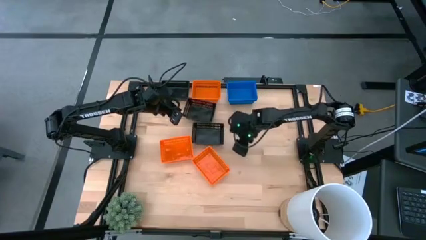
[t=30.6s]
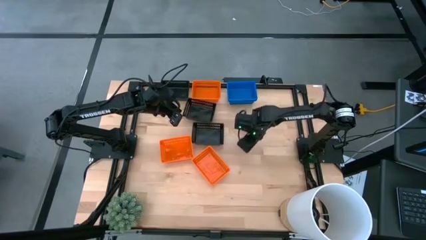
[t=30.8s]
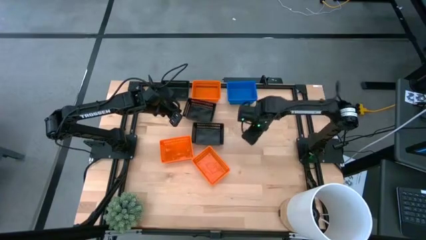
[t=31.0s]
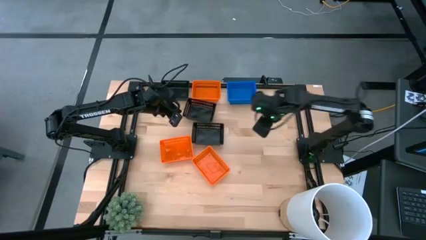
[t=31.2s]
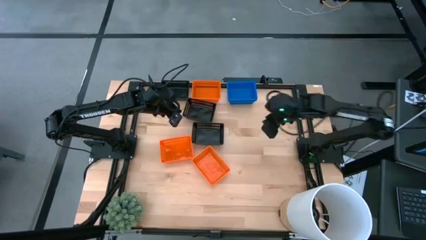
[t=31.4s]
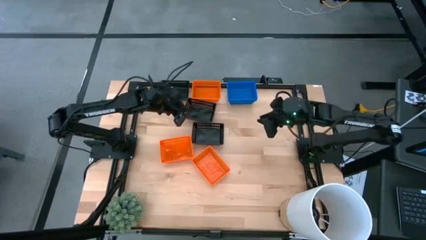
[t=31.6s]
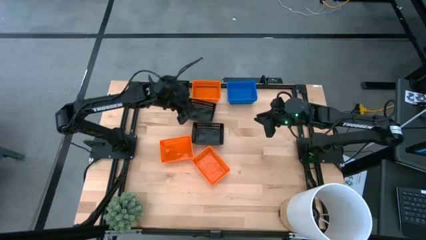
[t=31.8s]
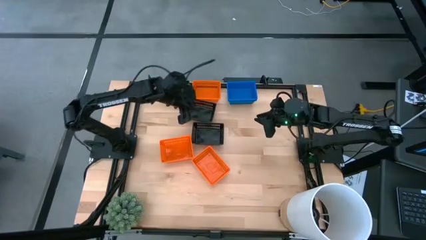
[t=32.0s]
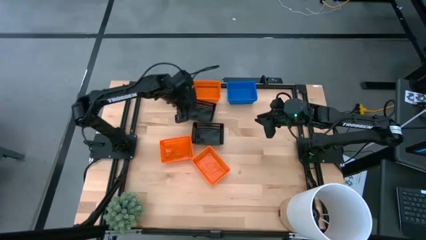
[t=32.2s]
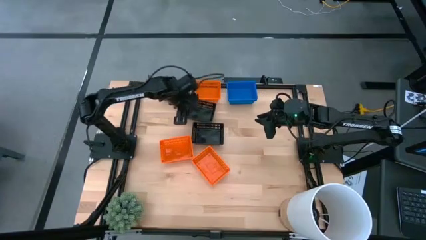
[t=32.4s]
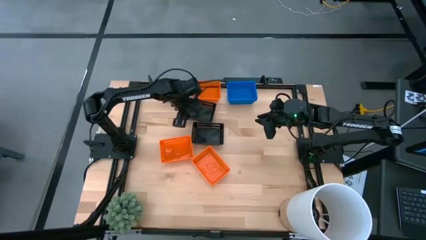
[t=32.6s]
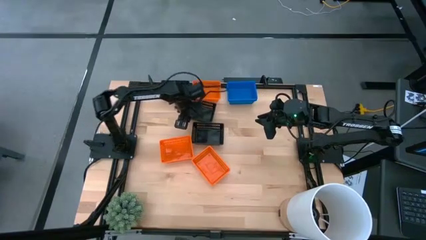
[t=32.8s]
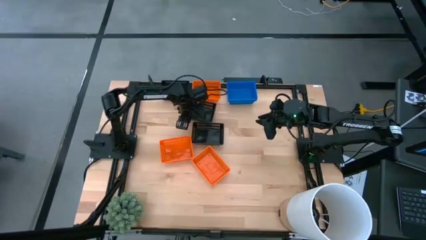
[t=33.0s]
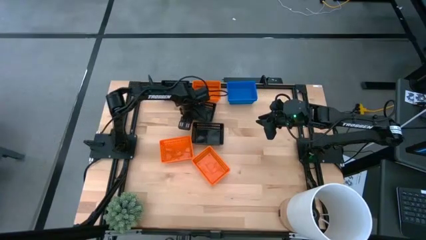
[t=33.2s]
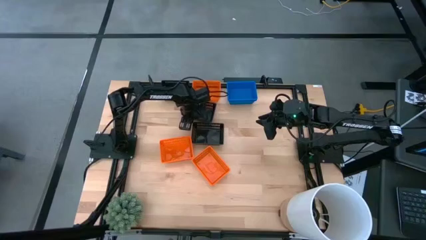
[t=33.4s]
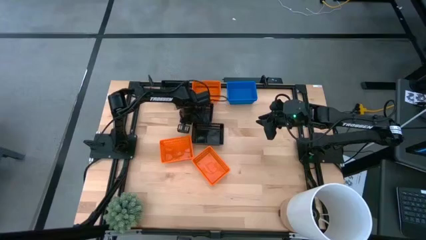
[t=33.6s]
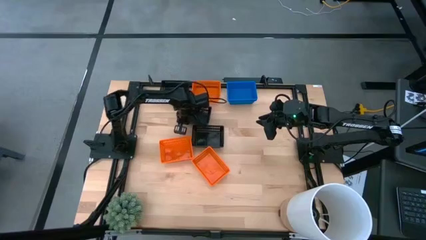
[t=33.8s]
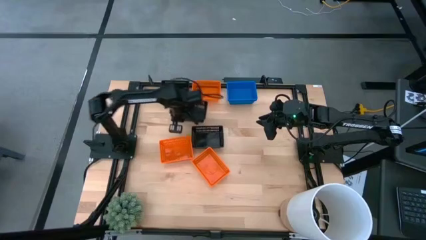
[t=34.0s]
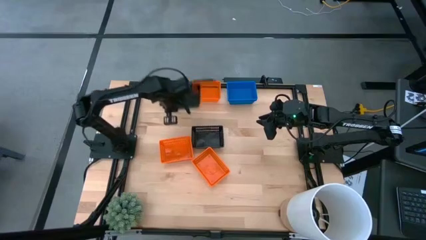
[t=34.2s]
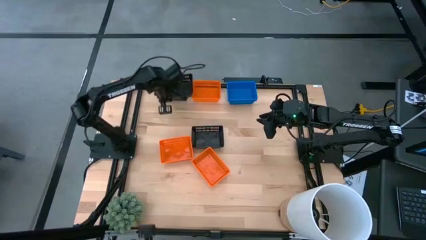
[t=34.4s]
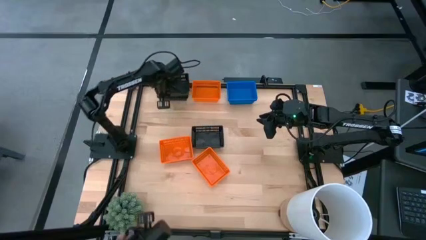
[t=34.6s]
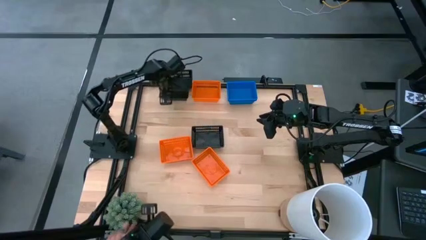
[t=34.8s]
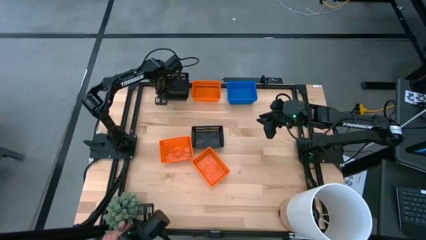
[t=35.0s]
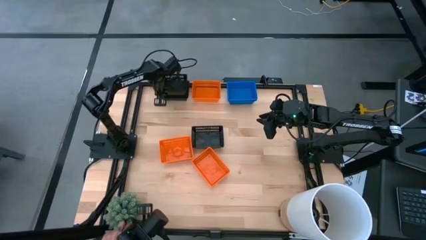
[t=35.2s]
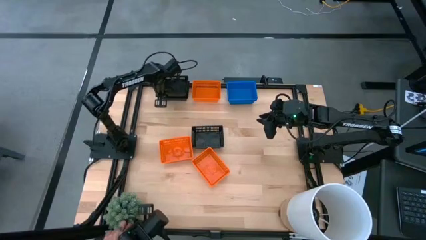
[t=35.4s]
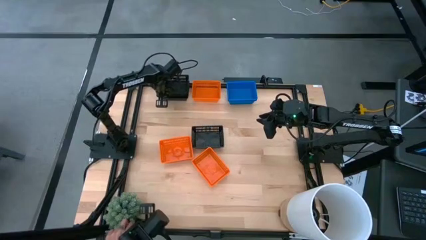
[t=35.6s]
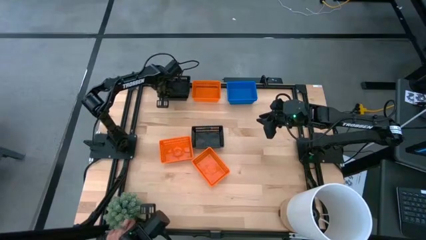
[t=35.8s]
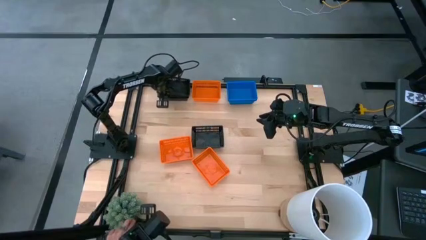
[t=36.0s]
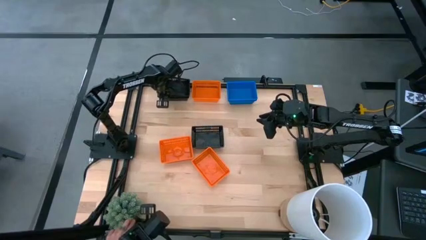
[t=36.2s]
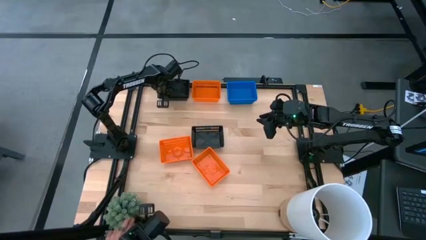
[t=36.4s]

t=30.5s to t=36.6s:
Stack the middle black bin on top of the top black bin

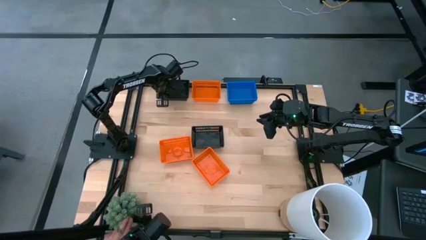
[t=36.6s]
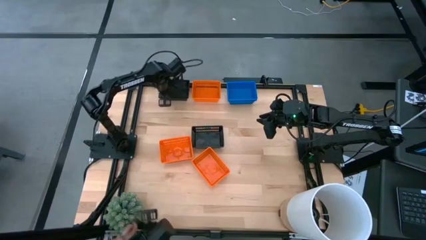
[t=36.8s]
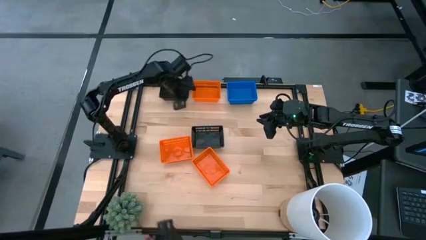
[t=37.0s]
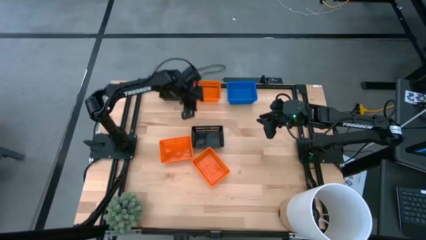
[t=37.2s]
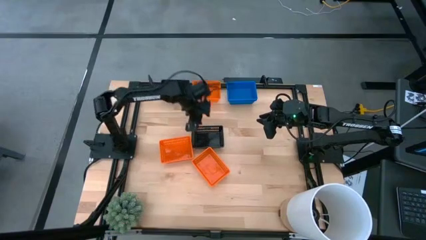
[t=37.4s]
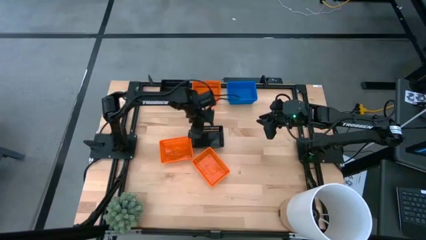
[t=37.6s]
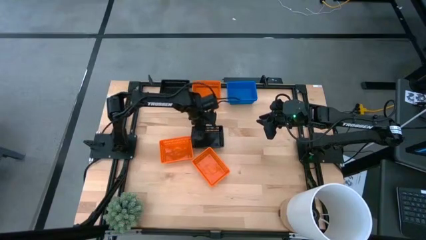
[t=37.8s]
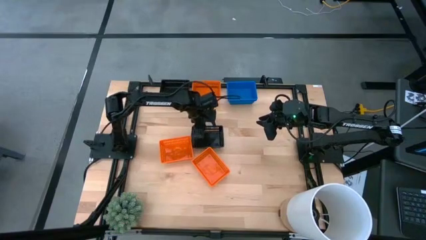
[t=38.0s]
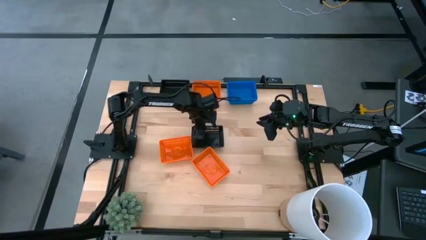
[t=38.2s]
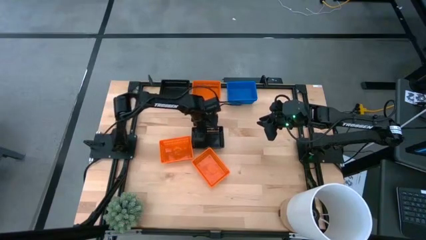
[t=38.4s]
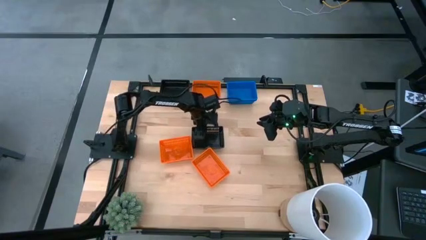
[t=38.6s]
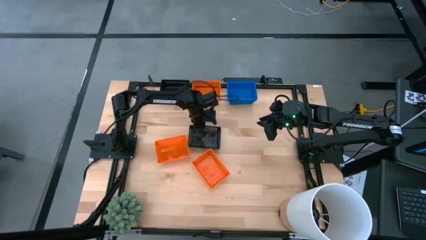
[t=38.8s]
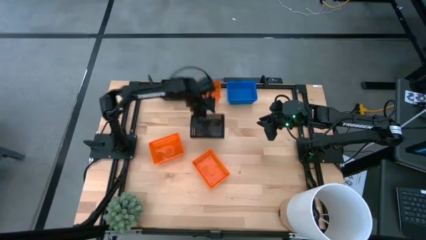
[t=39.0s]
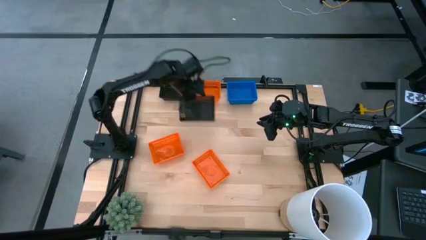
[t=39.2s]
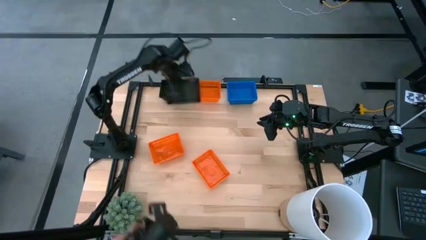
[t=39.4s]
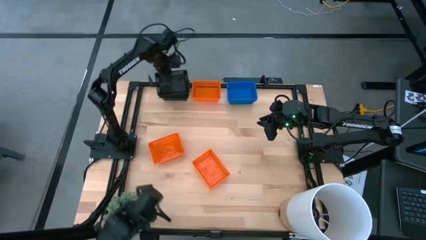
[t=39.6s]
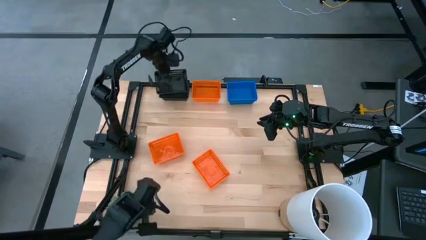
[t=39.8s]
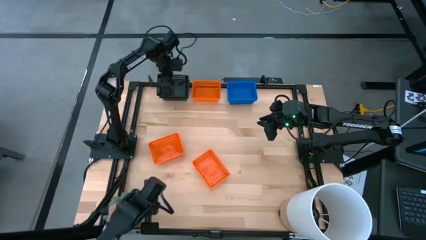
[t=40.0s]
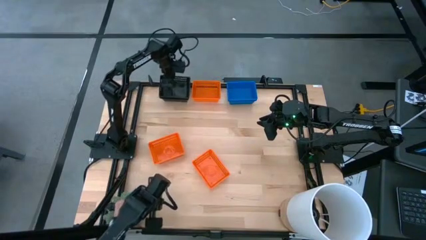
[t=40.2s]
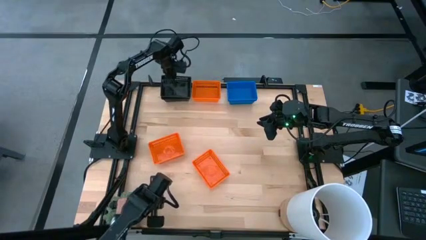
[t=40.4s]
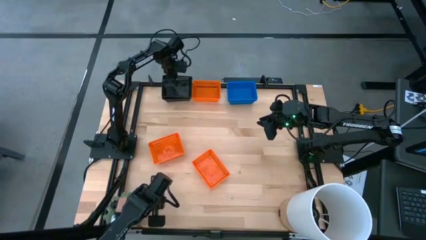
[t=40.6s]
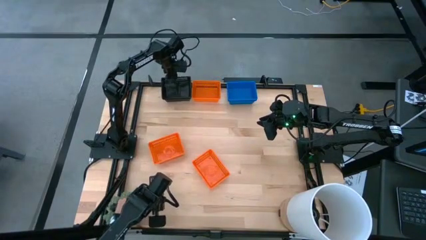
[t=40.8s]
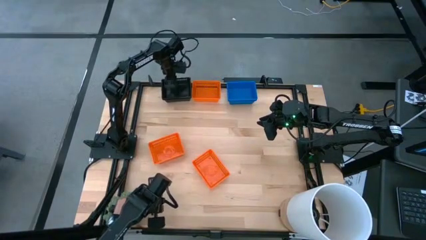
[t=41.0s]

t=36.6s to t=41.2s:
Stack the bottom black bin on top of the top black bin

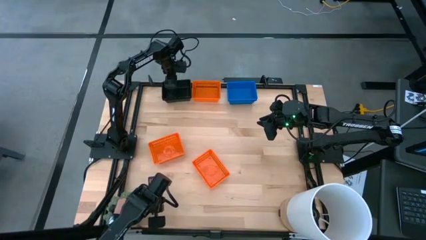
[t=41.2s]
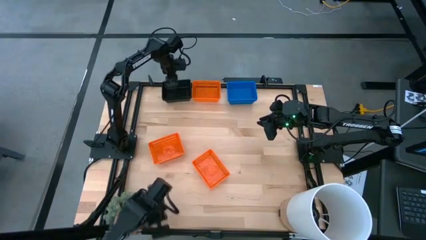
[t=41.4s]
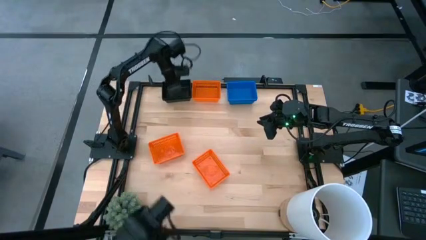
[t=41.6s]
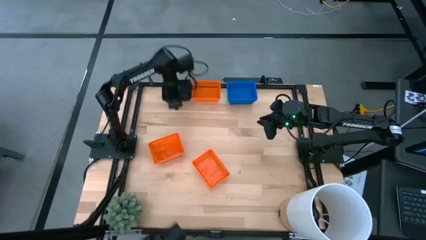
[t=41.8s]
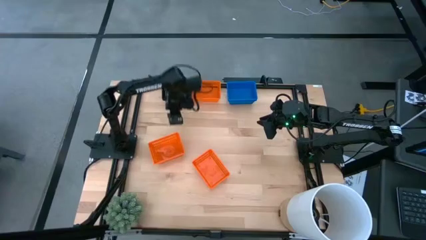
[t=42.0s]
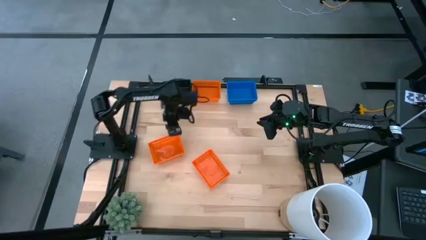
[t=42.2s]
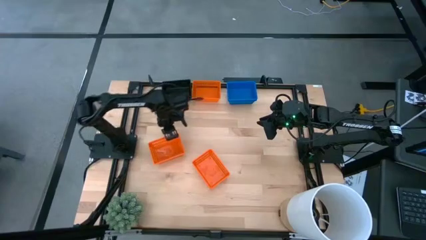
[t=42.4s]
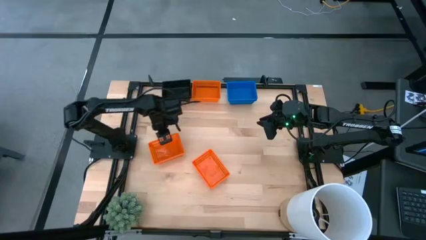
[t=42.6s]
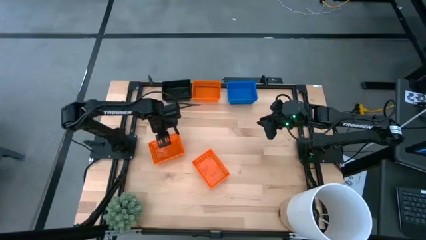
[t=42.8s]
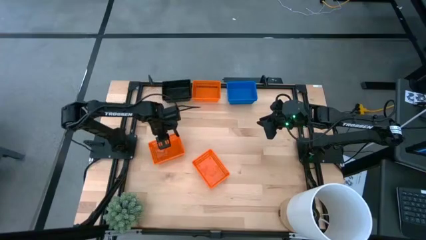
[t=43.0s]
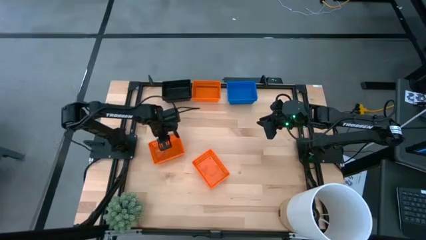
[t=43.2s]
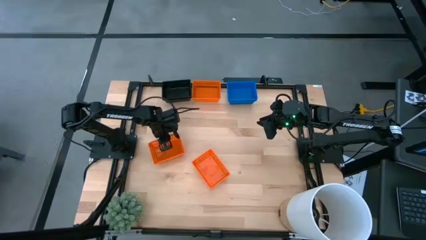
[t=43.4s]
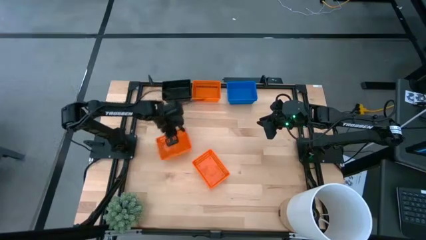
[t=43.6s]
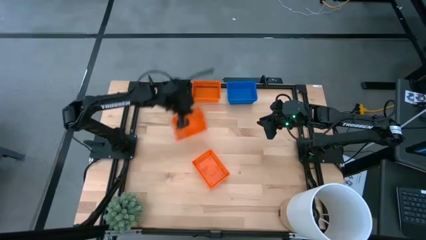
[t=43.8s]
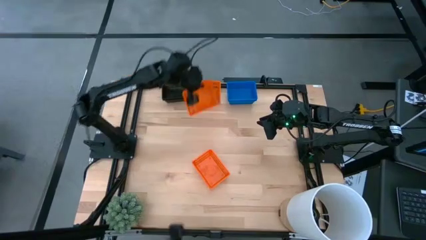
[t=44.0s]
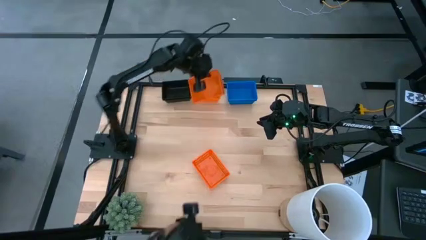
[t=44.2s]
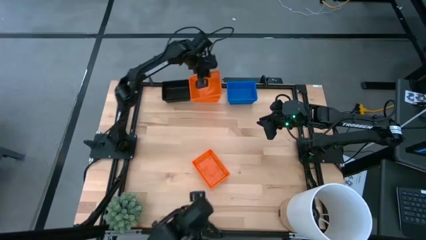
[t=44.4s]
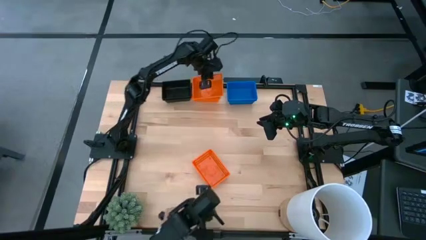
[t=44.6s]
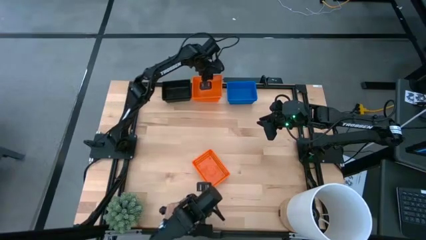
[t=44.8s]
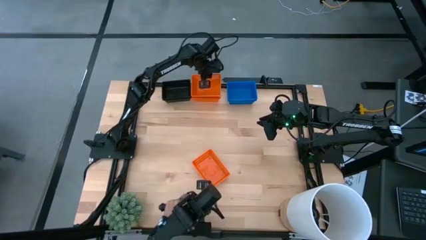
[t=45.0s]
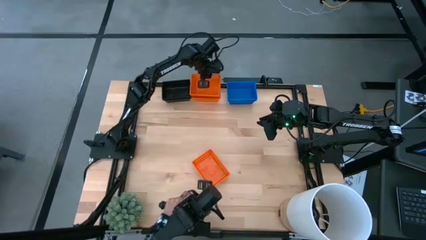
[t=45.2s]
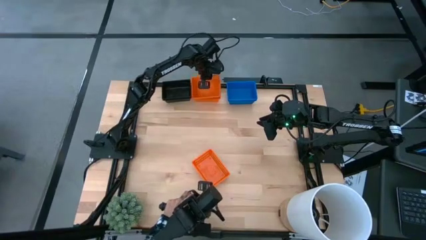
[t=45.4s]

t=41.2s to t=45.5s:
Stack the bottom left orange bin on top of the top orange bin
